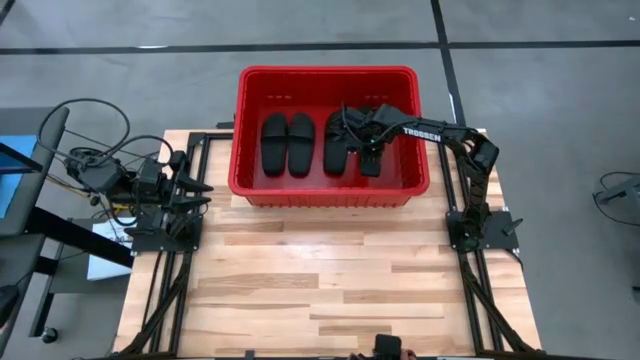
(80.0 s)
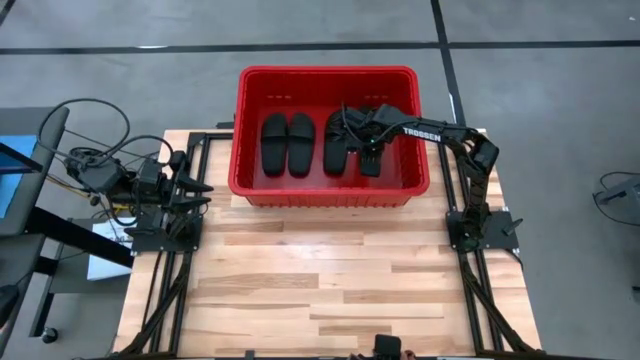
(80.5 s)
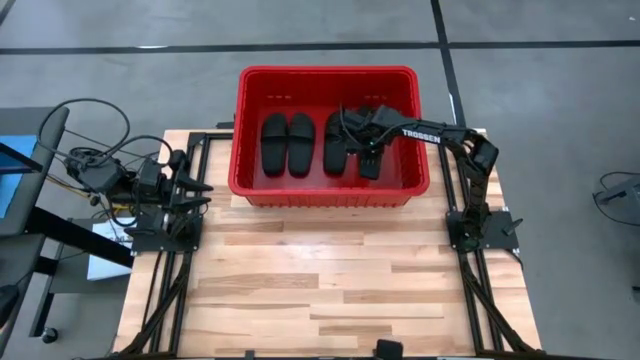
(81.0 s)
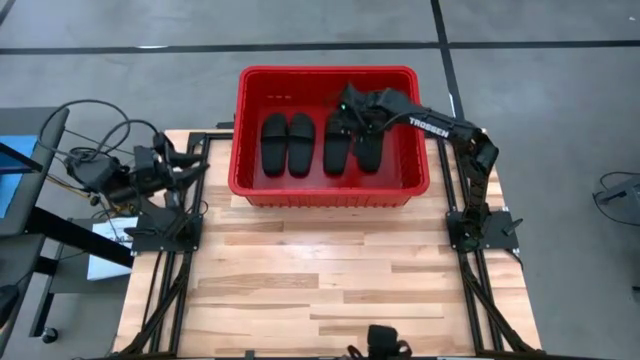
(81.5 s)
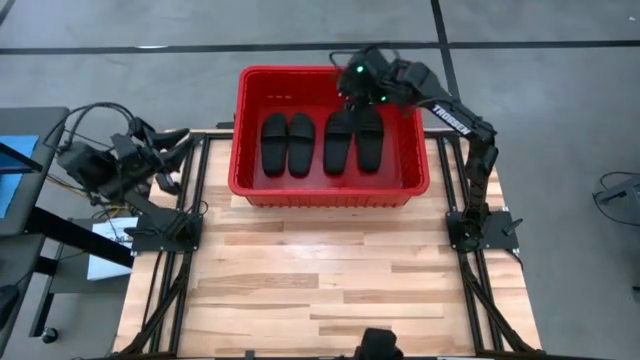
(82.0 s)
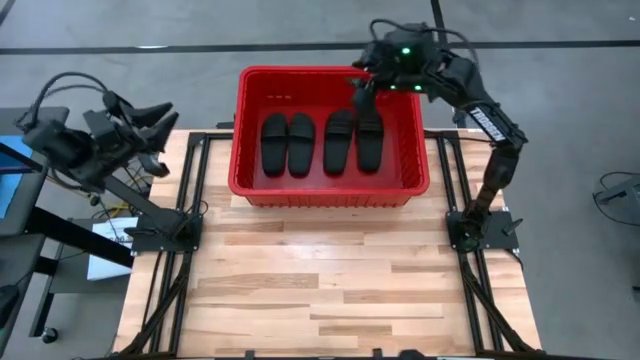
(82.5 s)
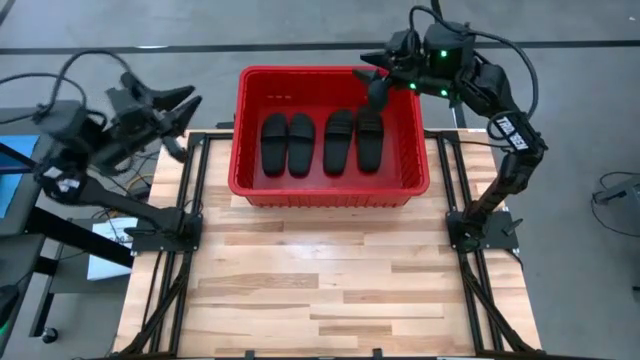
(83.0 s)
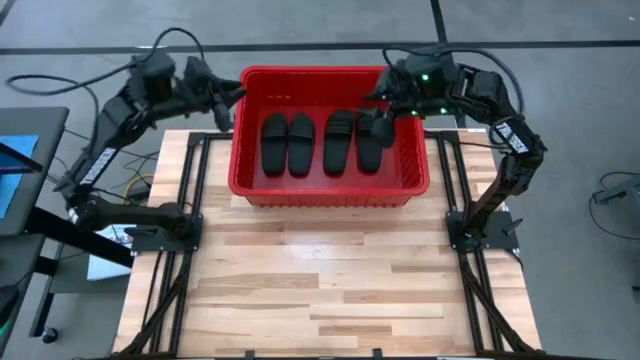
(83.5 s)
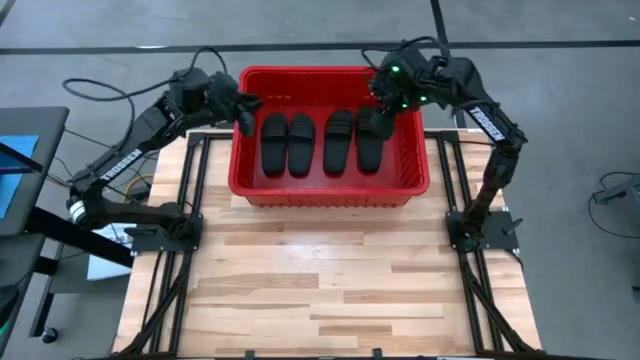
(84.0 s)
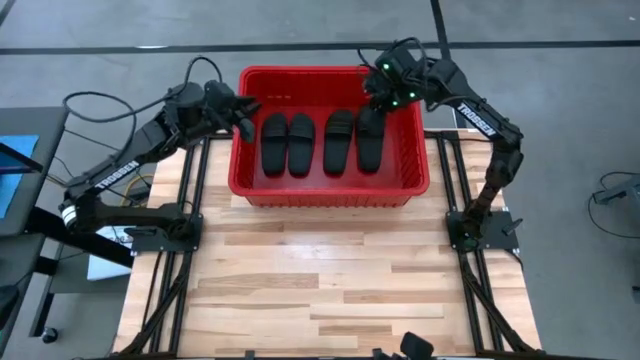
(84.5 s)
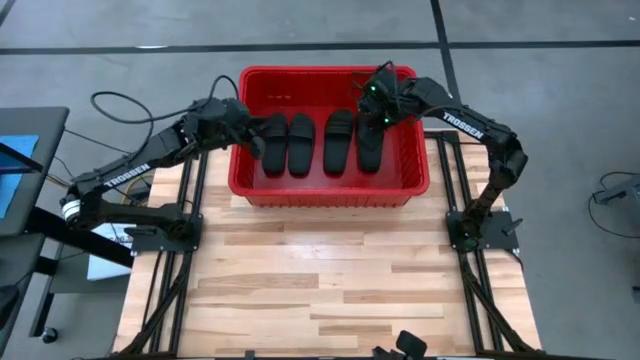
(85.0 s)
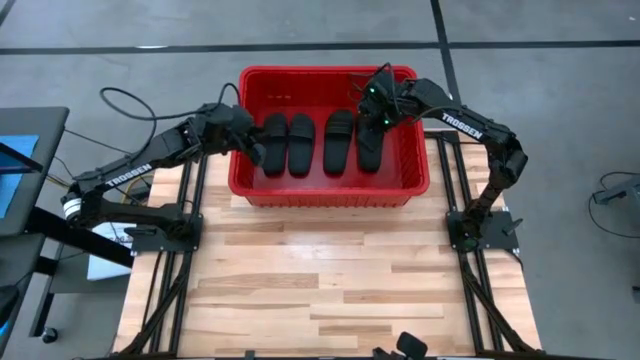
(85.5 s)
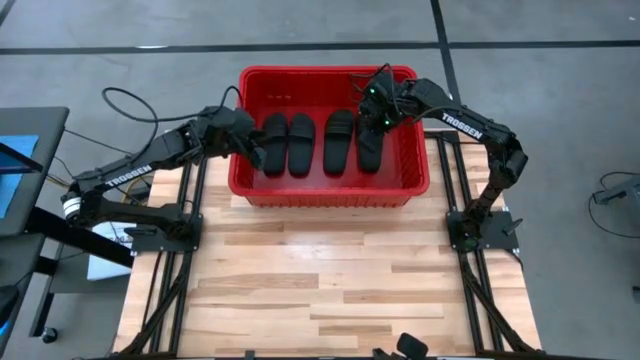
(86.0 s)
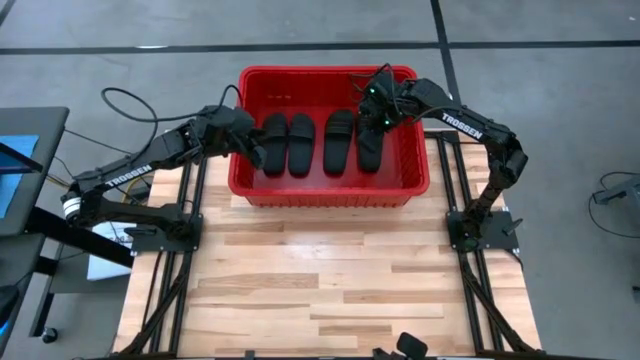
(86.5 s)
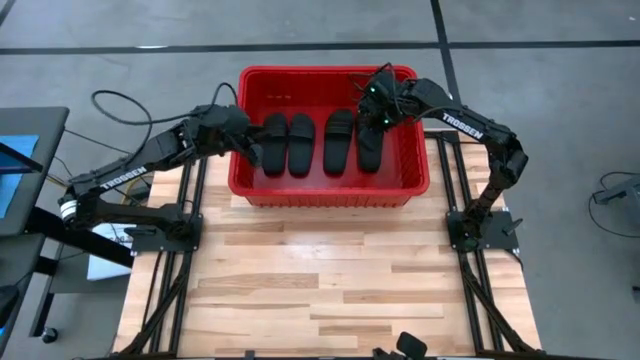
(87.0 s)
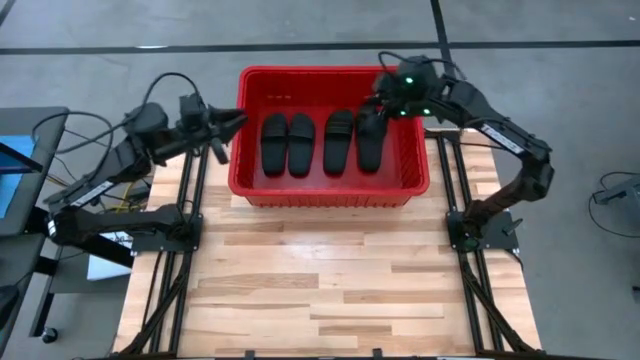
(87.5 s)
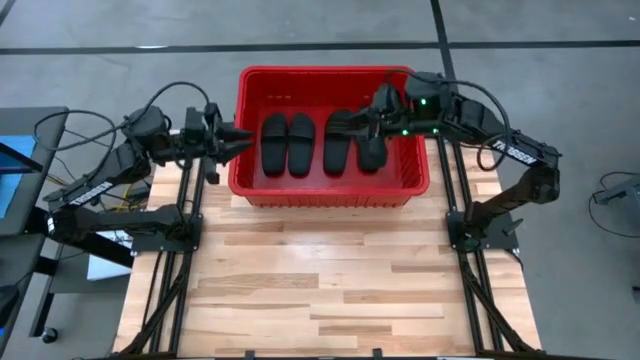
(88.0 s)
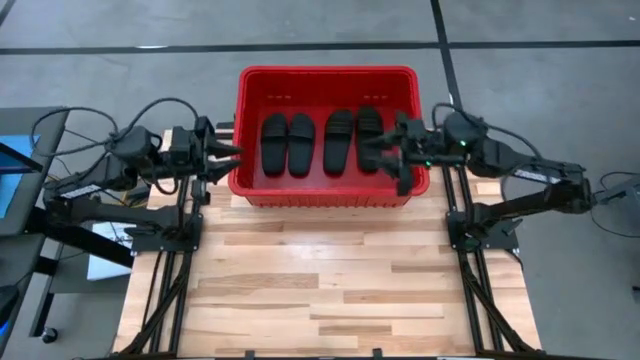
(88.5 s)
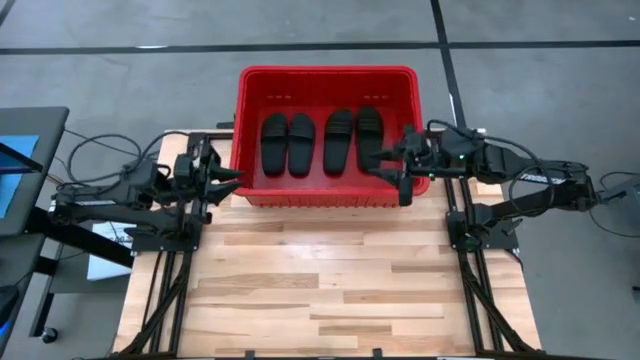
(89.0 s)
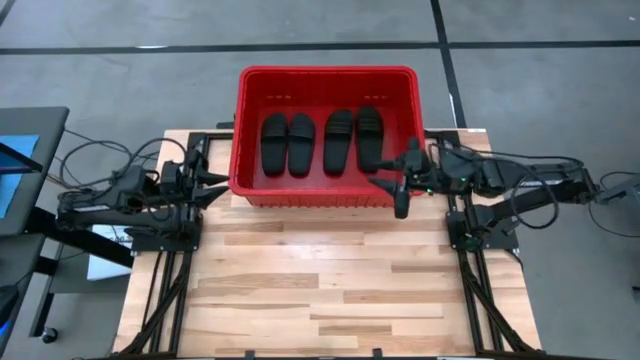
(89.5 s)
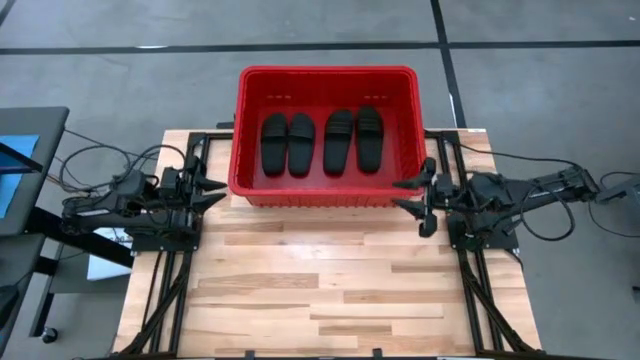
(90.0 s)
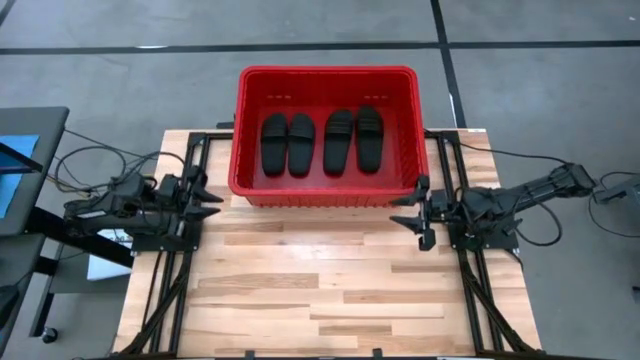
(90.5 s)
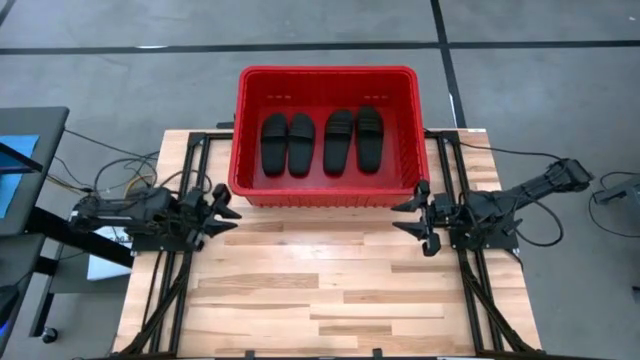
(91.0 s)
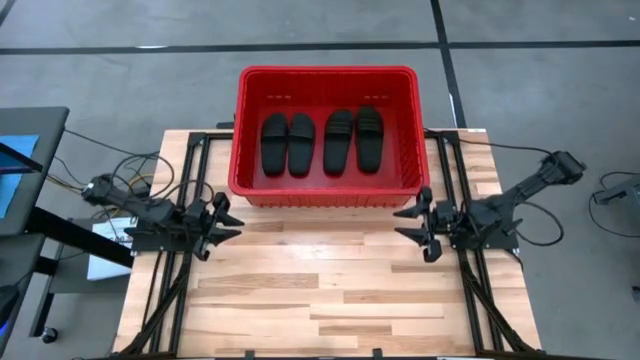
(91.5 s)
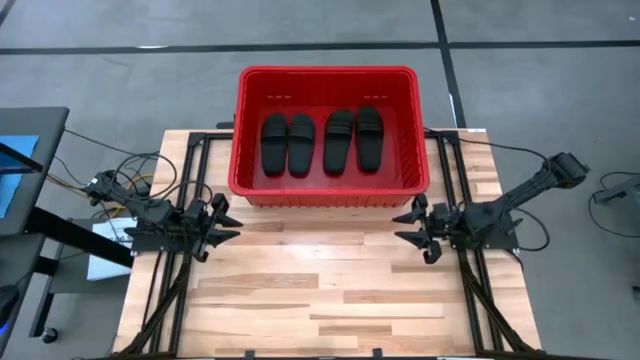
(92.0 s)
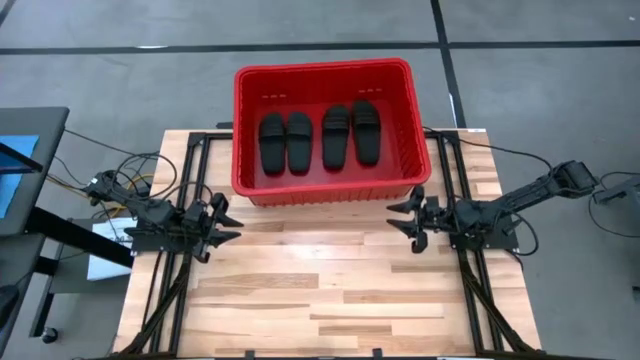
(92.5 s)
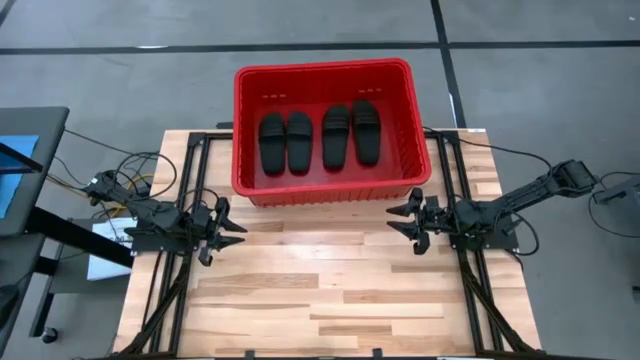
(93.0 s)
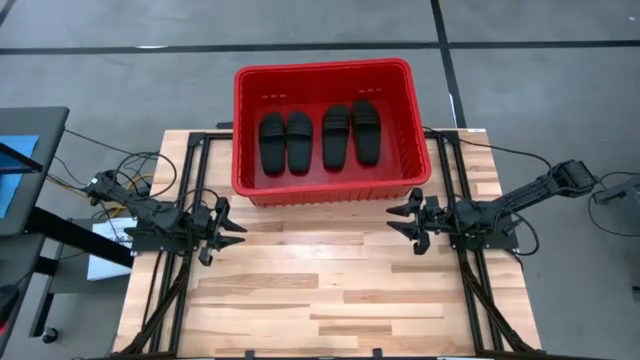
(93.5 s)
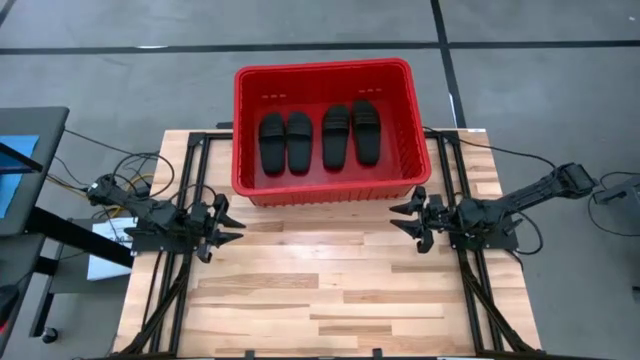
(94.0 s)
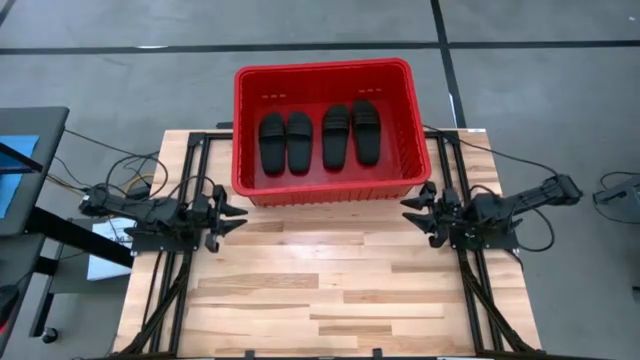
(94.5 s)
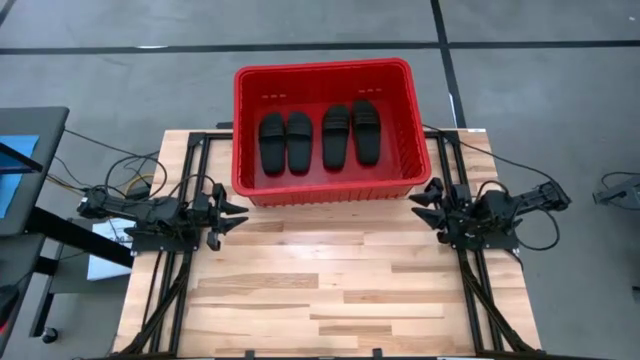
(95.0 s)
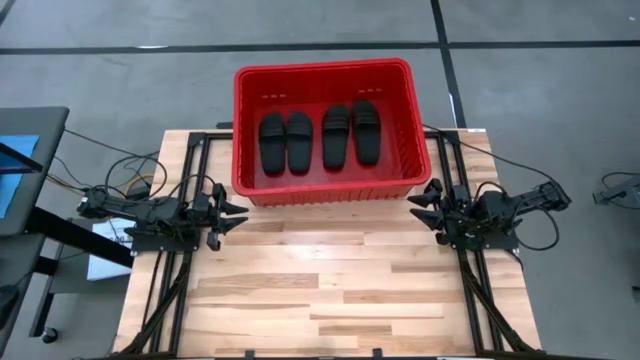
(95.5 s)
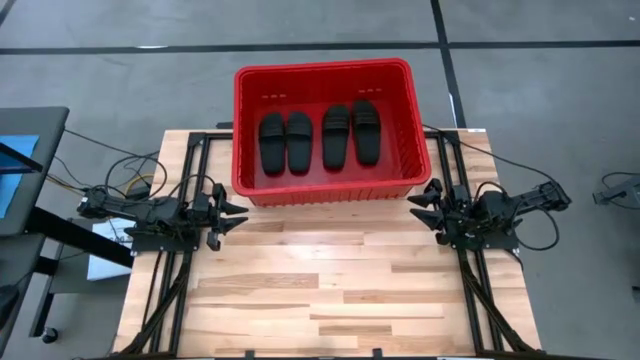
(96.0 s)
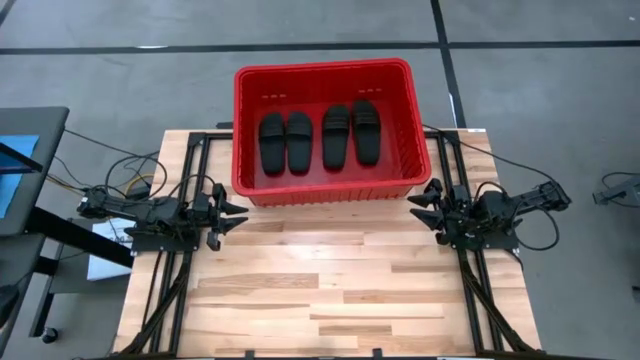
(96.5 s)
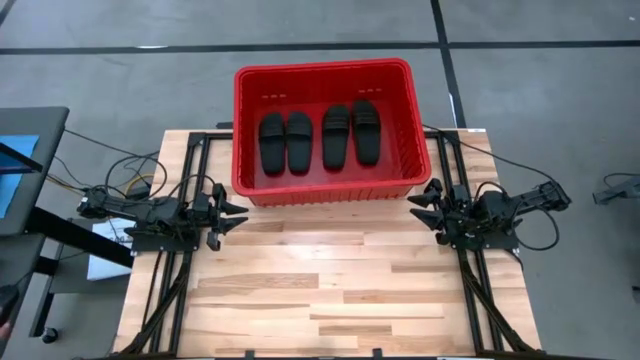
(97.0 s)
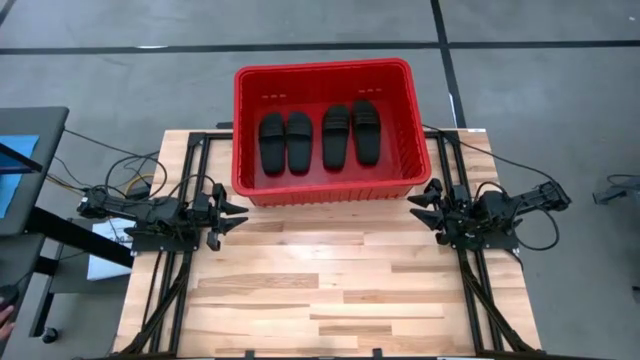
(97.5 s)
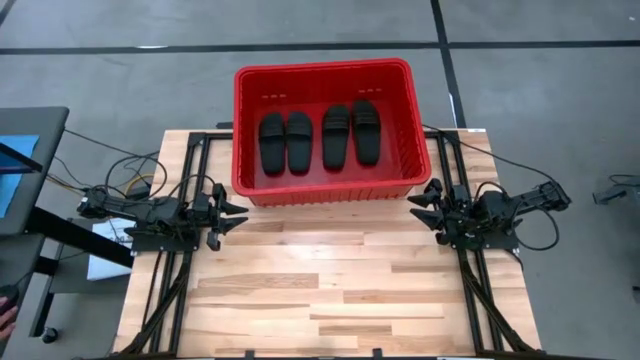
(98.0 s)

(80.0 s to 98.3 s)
Task: Pick and place slides into bin
Return to Home Position

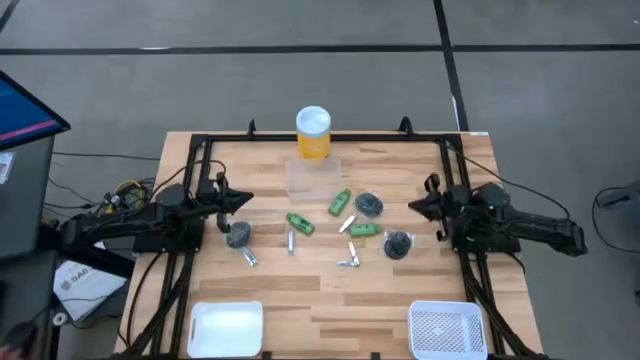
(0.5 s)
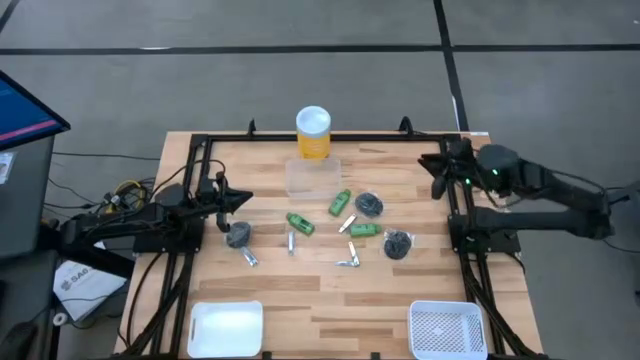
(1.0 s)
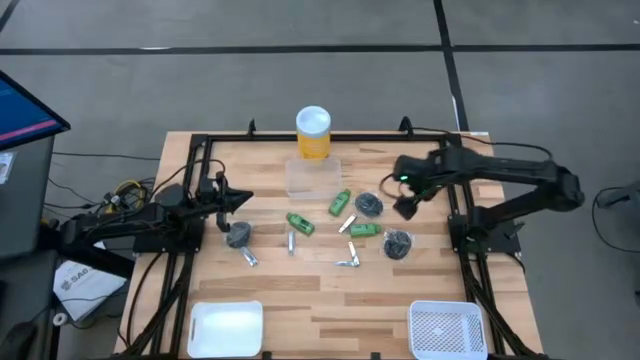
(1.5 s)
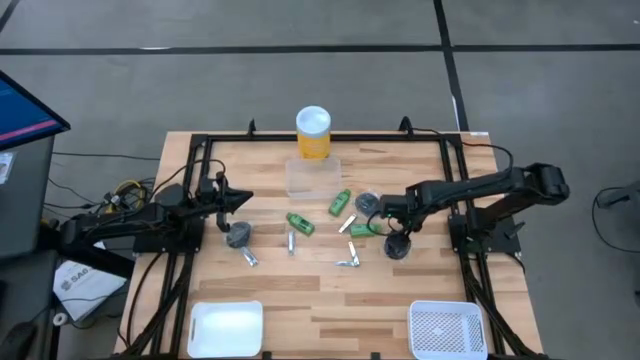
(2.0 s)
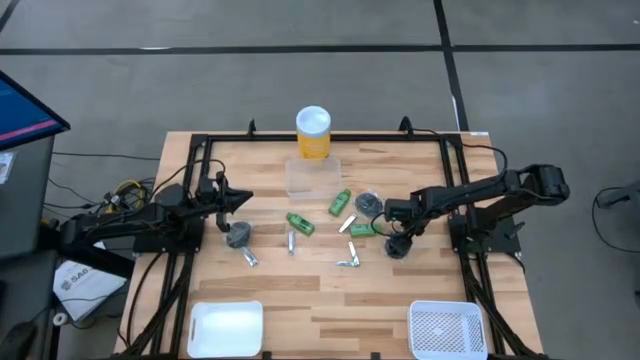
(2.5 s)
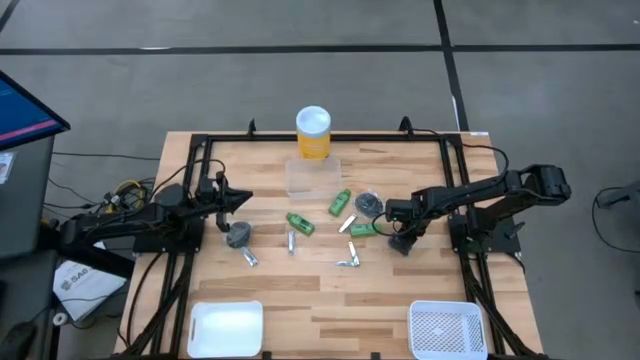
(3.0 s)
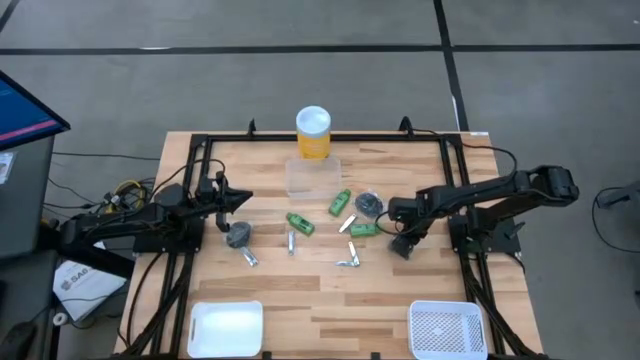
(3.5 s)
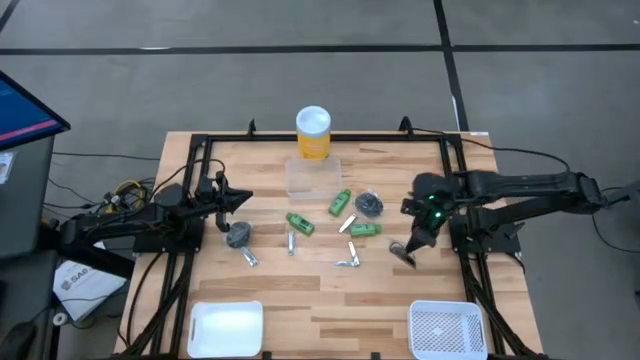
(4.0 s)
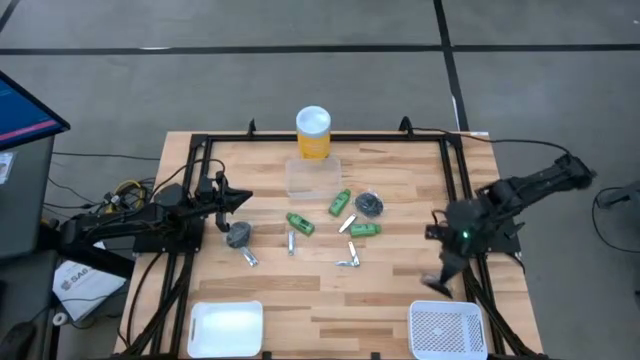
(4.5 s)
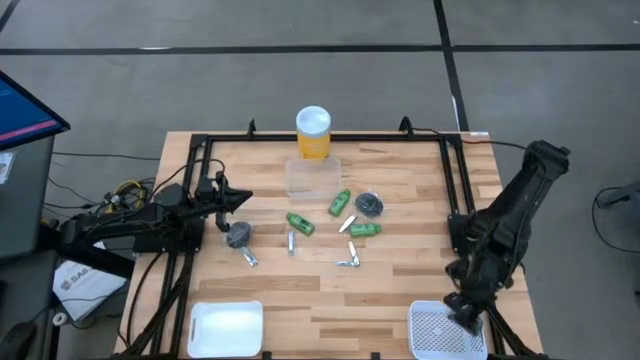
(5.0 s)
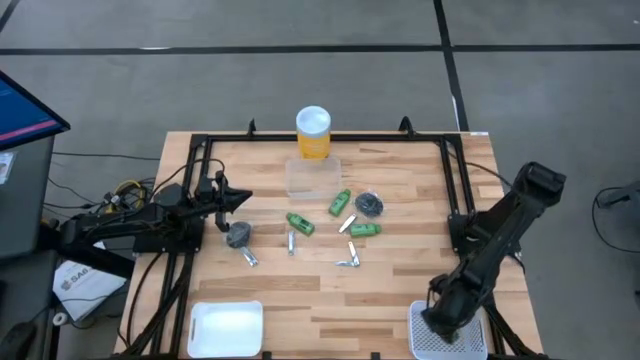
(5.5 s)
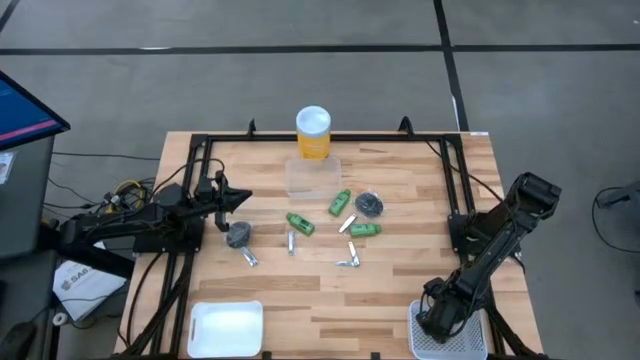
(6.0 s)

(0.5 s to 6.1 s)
Task: Pick & Place Travel size toiletries
Put the bottom right black hairbrush into the right white bin
